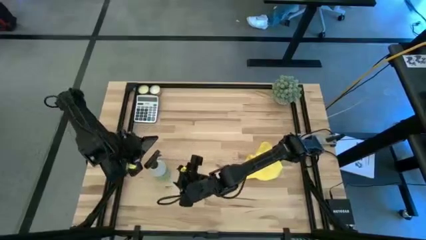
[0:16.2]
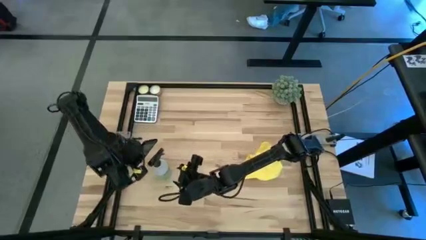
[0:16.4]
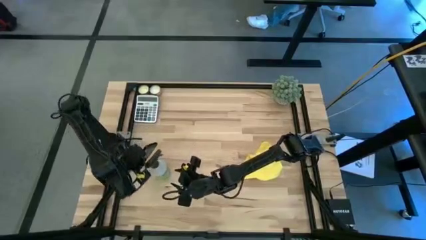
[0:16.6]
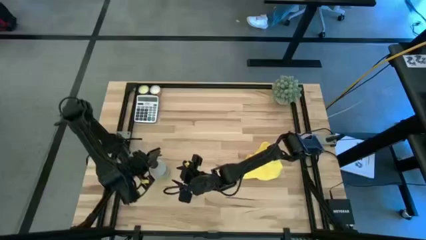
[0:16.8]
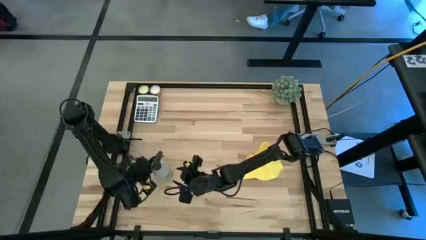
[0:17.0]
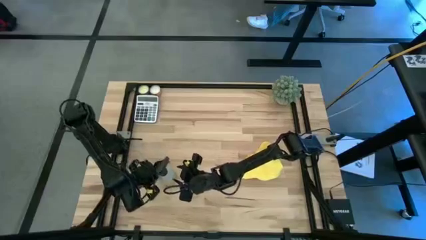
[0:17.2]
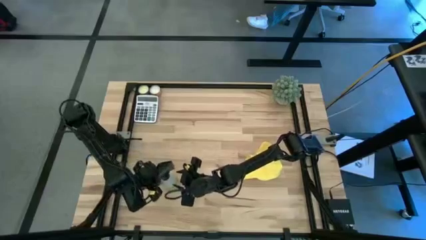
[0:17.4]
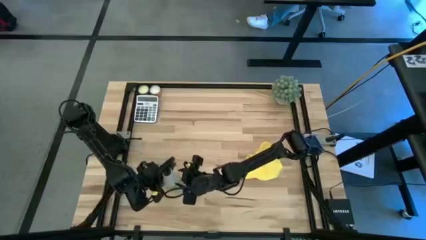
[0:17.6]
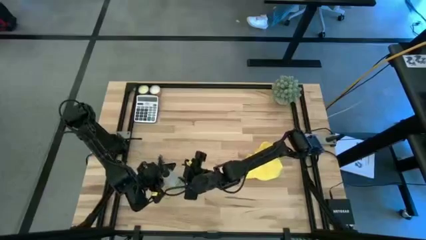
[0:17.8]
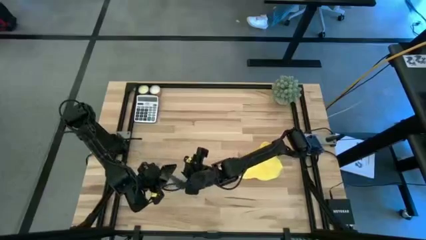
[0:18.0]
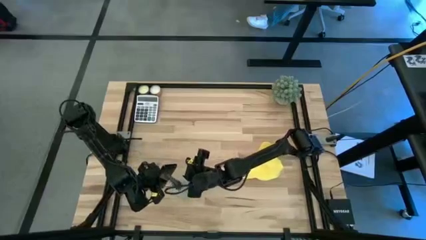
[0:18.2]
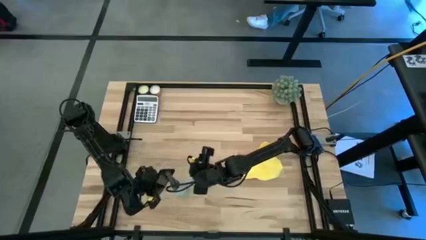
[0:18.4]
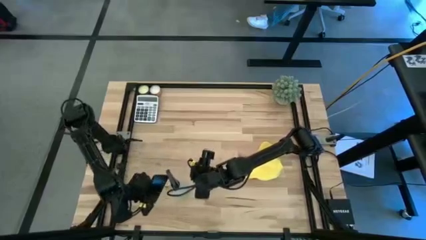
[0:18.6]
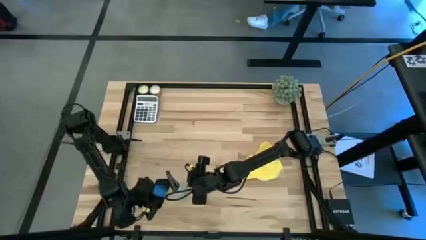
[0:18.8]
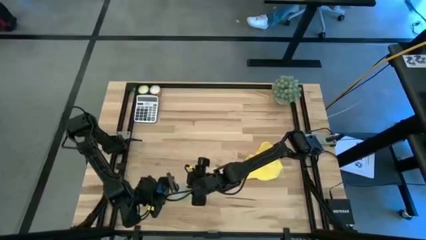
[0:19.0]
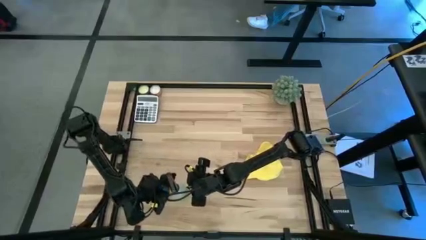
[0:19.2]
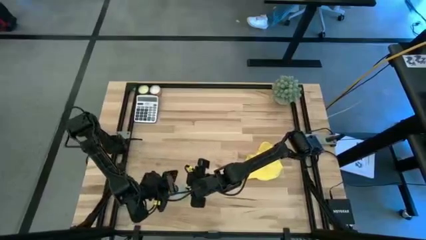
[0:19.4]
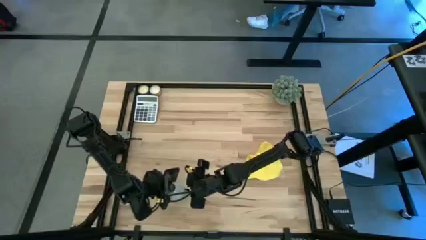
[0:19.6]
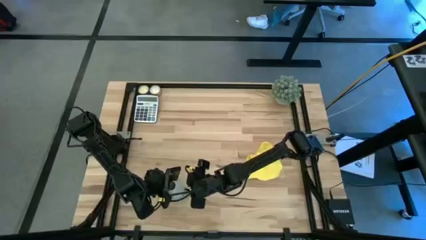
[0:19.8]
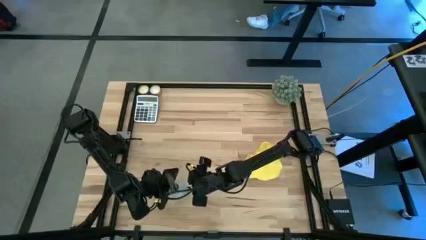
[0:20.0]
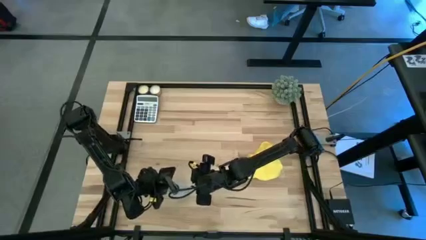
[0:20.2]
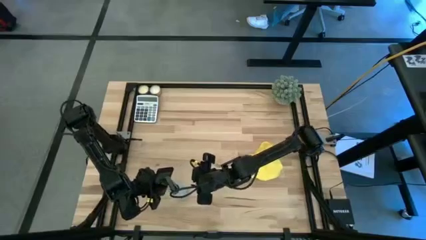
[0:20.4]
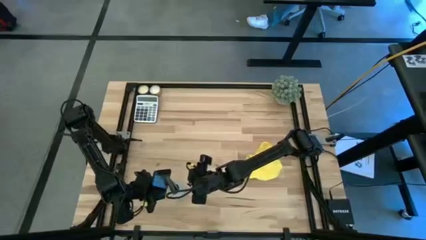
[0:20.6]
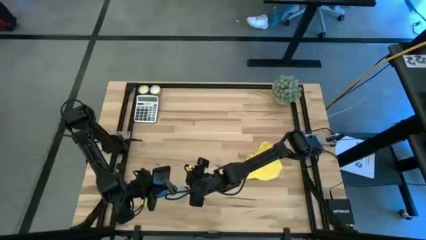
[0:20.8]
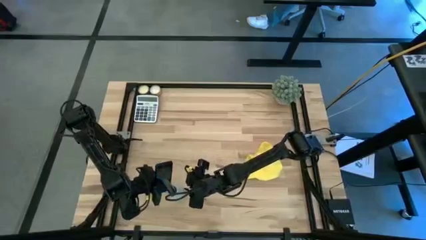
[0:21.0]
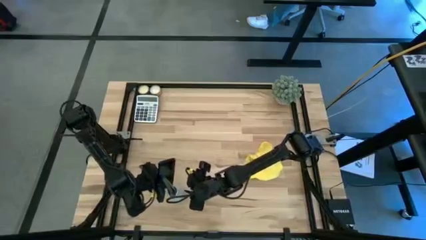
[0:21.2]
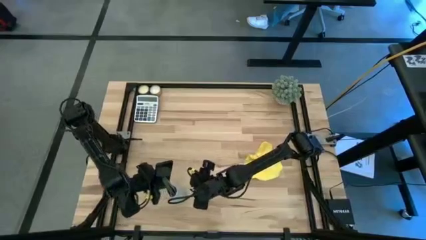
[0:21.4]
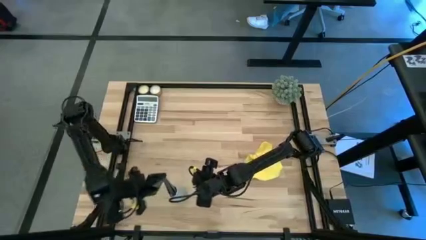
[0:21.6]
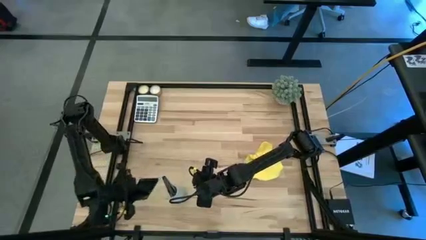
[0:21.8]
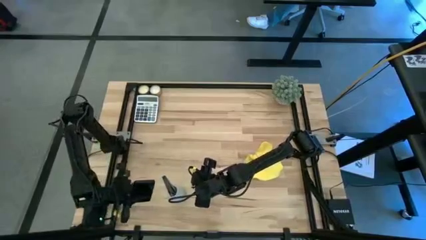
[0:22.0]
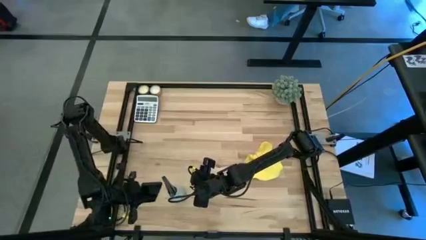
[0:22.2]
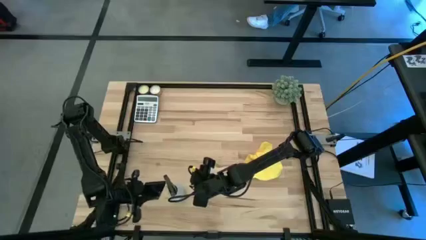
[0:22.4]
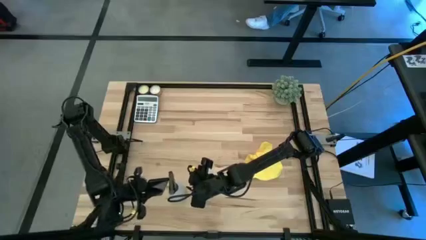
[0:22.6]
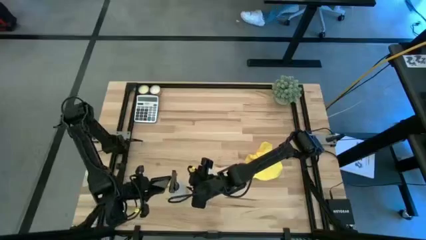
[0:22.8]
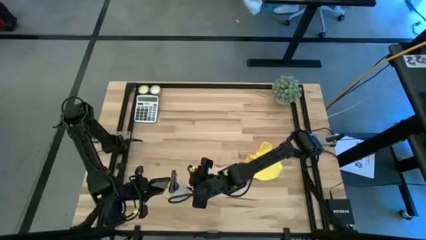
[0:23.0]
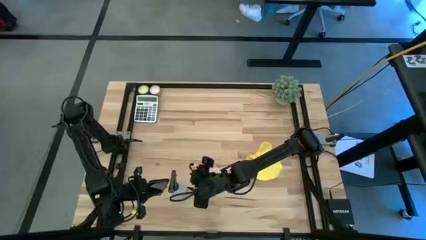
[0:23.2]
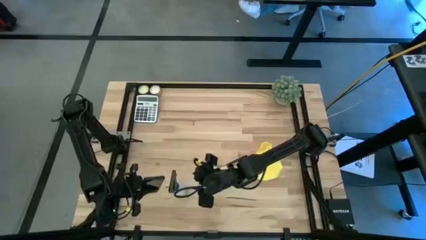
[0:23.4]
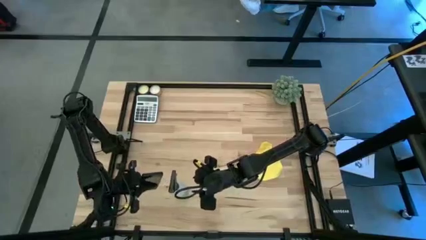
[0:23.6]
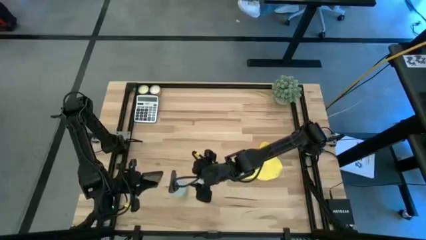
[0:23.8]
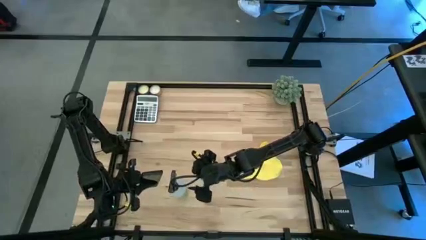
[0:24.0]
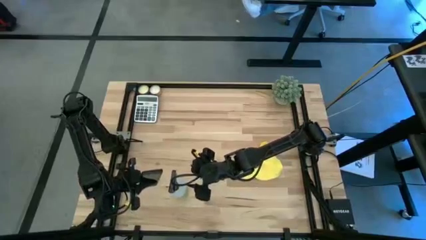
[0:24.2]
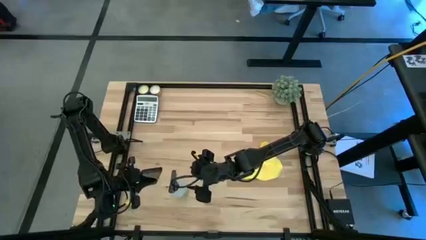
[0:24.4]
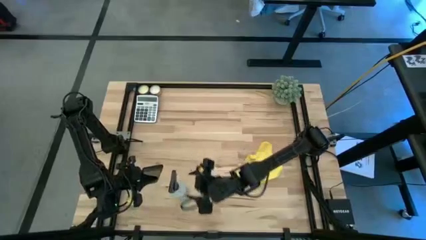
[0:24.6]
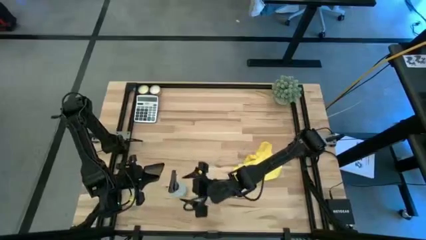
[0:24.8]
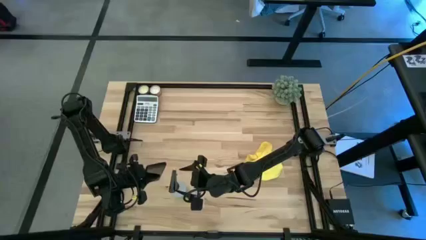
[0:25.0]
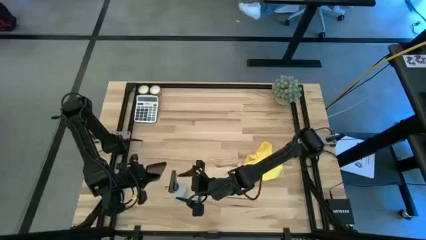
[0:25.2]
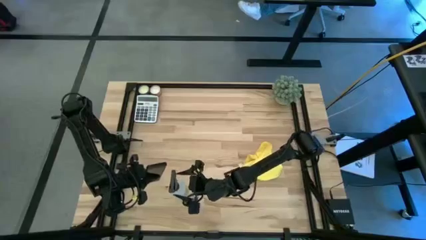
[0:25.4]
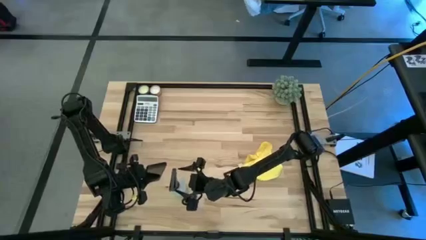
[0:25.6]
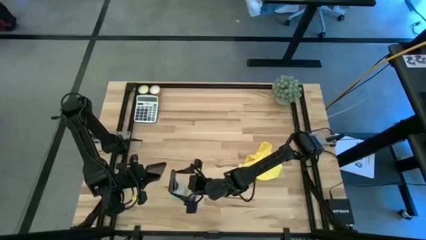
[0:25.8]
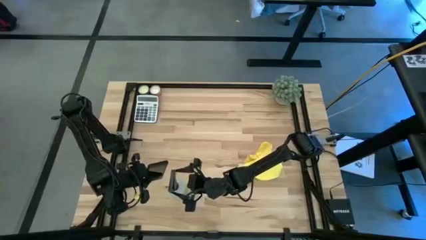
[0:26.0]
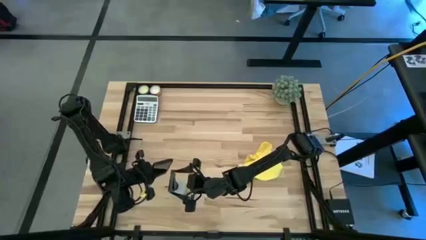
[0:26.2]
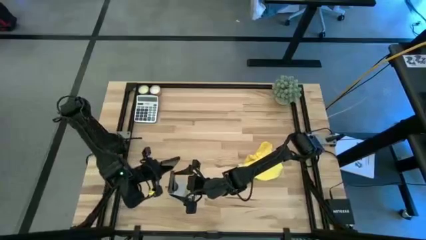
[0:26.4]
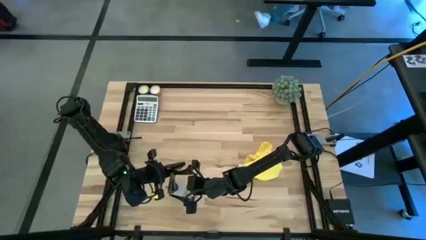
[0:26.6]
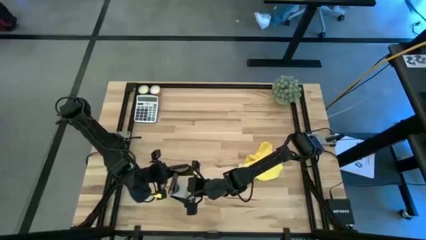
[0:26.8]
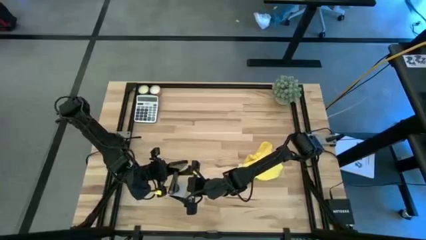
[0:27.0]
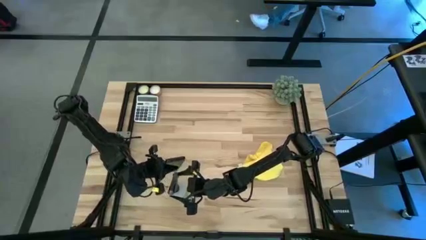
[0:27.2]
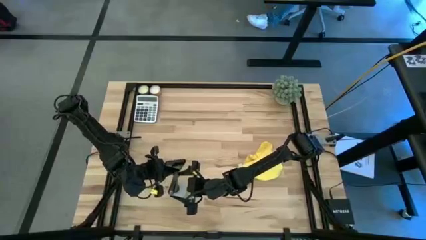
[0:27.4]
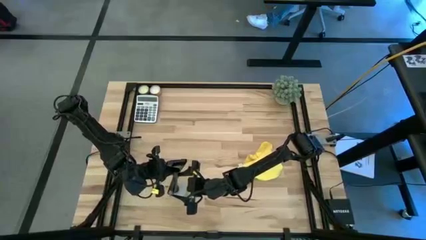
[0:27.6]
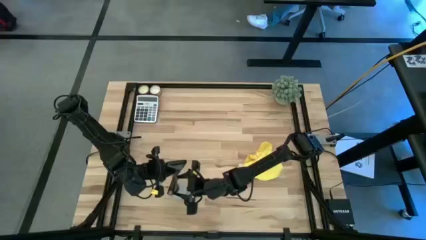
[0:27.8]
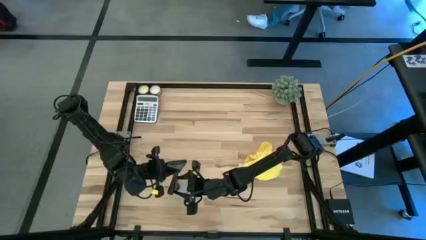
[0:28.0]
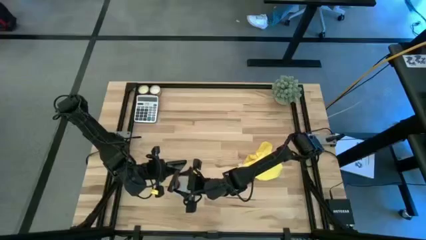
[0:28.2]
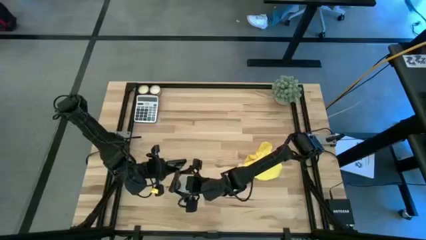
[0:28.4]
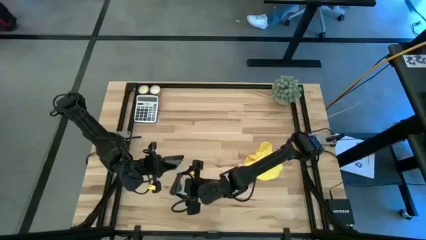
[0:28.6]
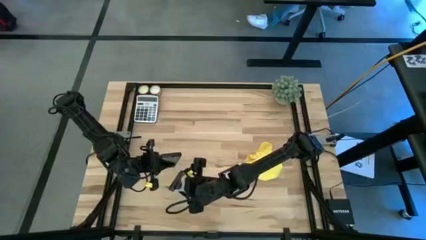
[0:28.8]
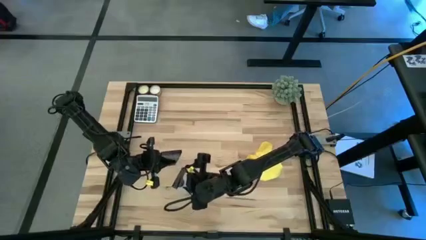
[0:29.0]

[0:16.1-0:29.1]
Task: Apply microfiber cloth
Spray the black cellphone screen using the white spray bottle
